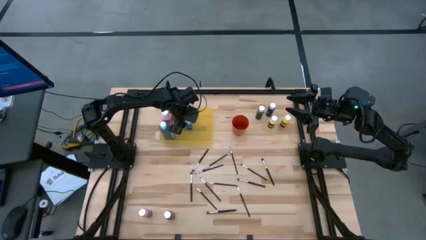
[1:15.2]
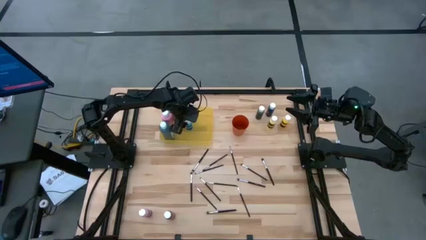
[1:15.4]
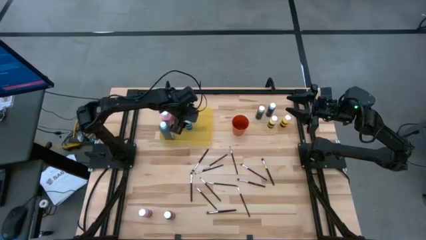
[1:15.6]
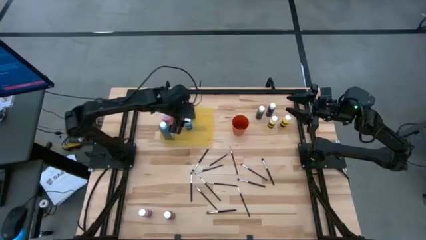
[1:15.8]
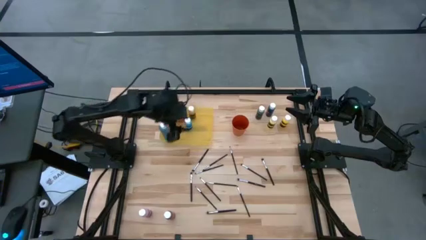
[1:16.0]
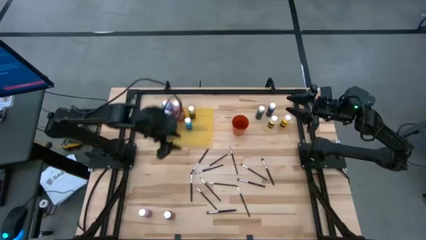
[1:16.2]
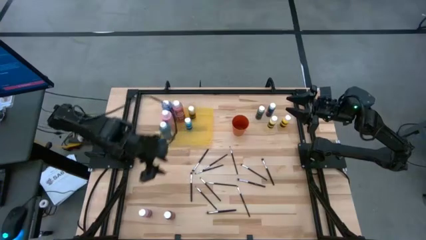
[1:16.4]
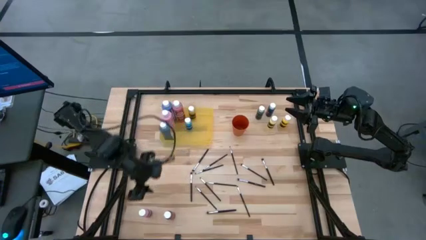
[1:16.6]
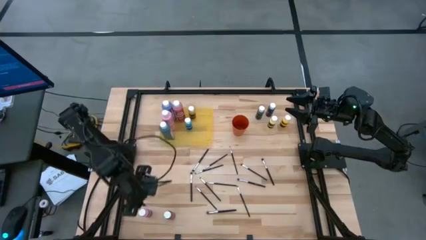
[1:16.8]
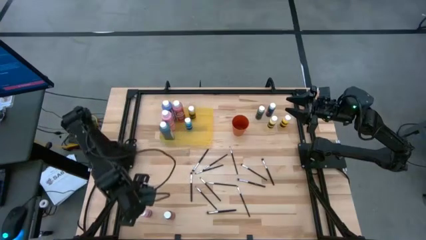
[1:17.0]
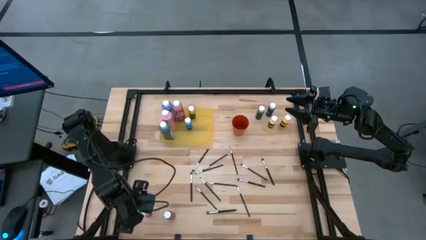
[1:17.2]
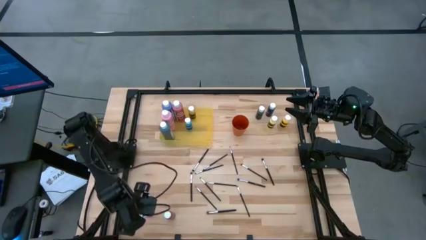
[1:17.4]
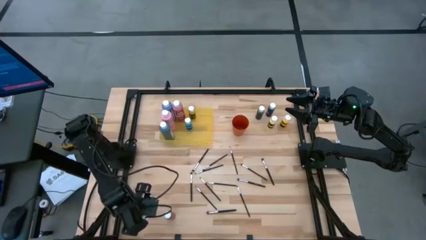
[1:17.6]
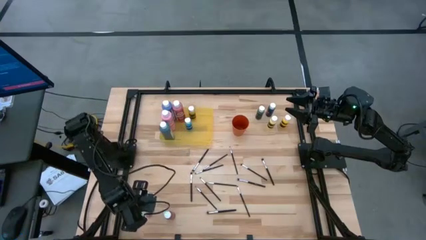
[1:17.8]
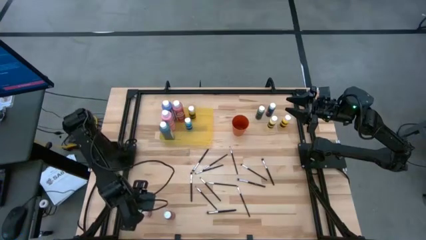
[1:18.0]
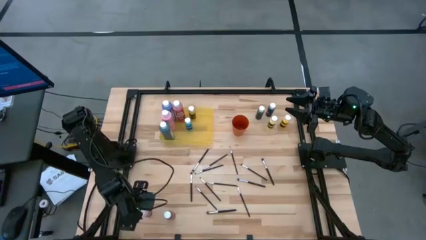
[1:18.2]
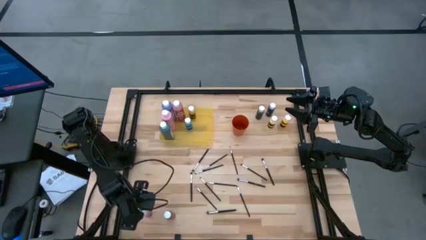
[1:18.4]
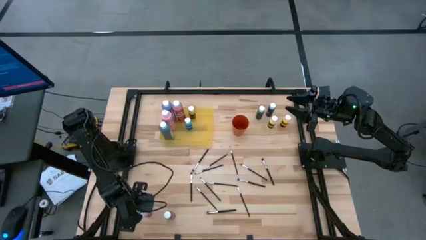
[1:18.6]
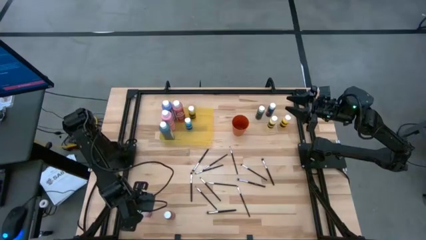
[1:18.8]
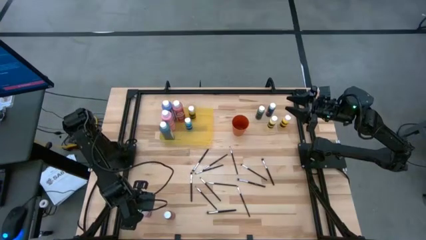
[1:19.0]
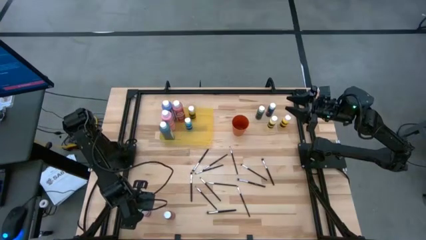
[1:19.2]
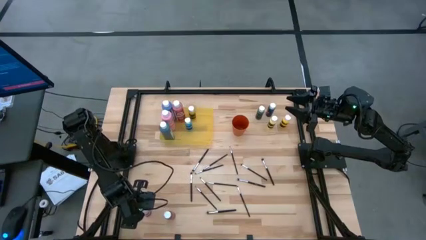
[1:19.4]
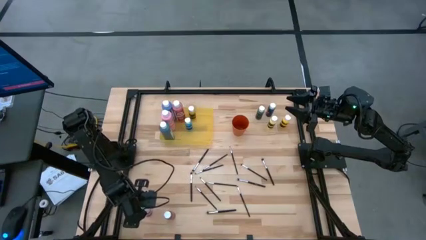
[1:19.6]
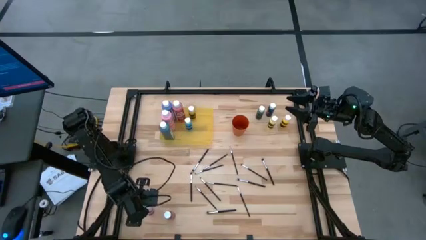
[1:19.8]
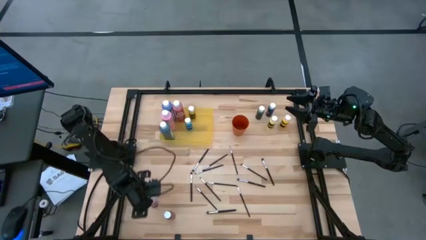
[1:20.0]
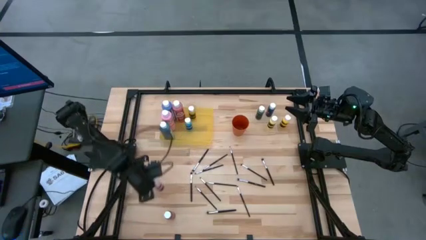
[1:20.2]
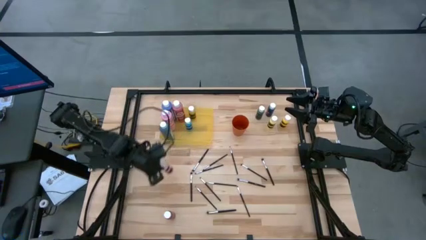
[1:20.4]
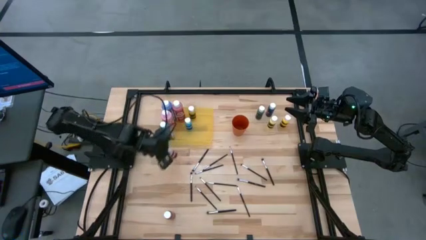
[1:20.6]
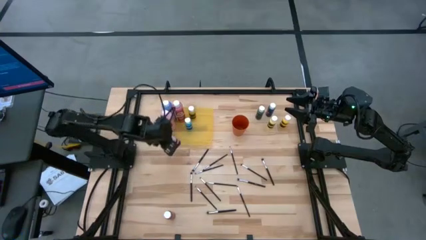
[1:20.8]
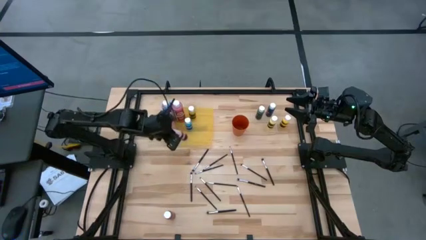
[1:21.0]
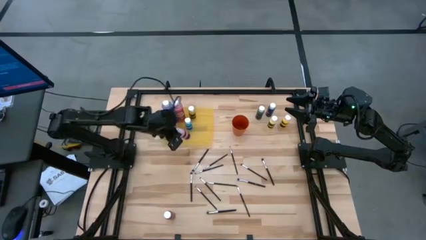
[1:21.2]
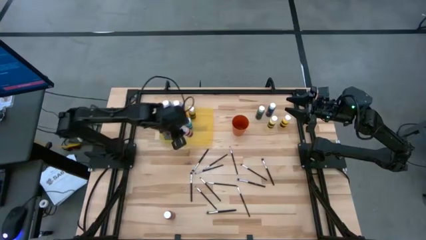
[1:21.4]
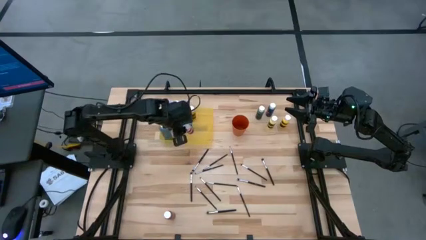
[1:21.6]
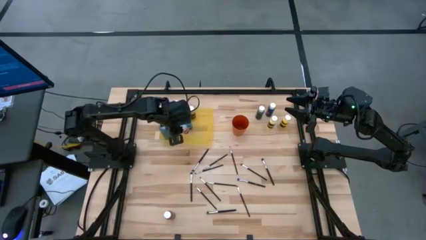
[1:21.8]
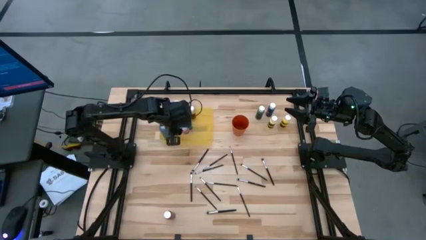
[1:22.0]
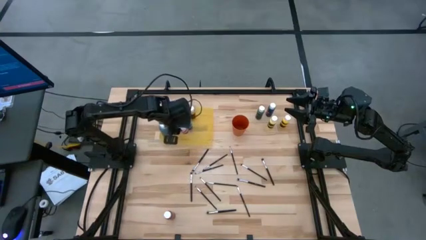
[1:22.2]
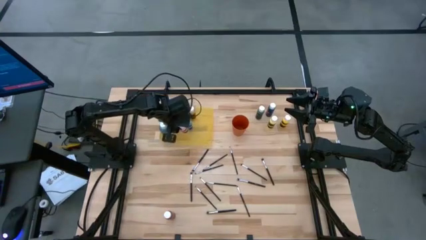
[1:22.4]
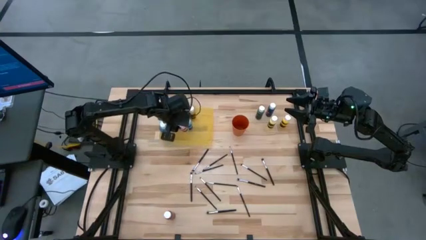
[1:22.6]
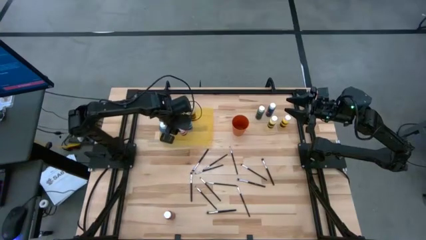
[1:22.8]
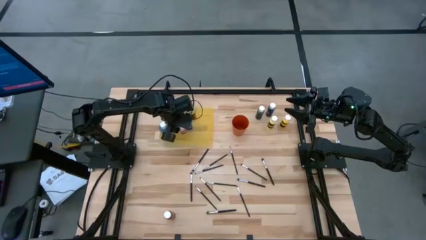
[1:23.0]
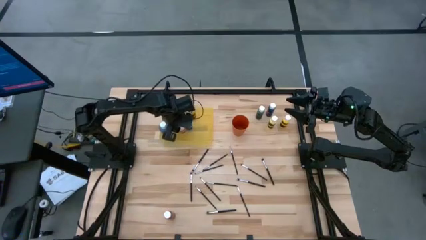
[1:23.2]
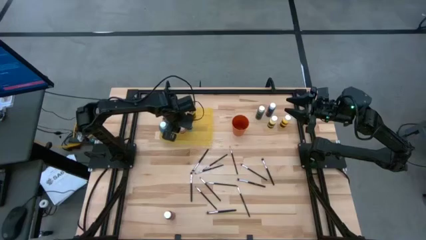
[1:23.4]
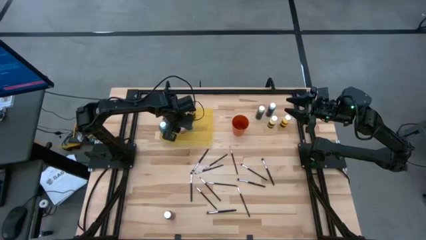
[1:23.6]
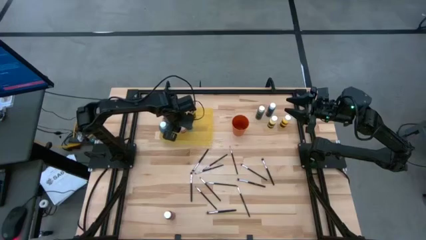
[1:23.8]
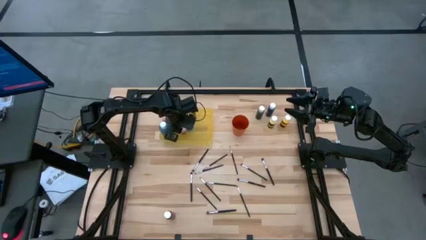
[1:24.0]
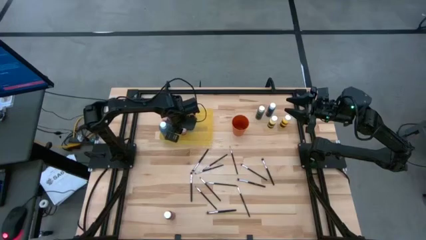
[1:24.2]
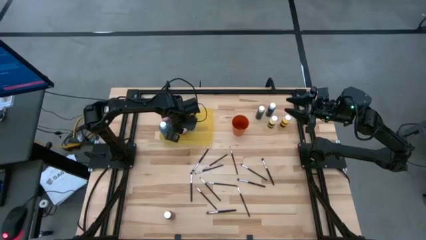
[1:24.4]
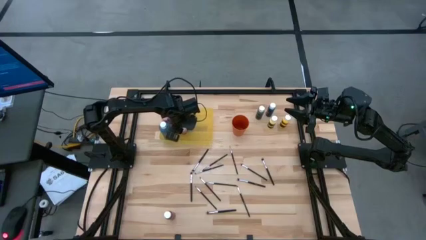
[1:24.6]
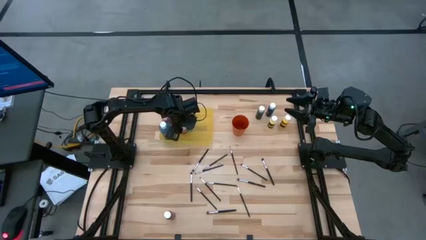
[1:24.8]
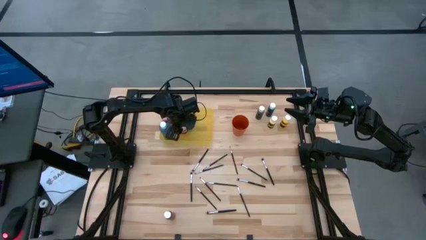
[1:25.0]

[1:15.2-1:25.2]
Task: Pick & Place Paint Supplies
Put the pink paint bottle into the yellow bin

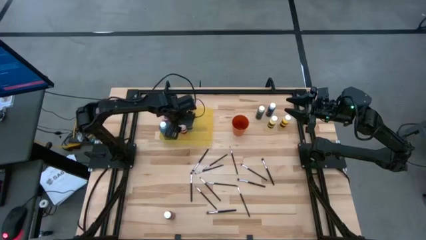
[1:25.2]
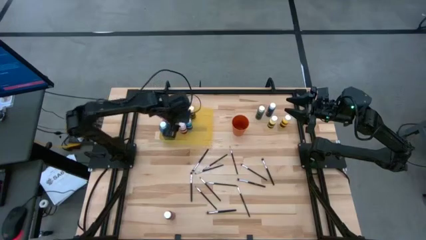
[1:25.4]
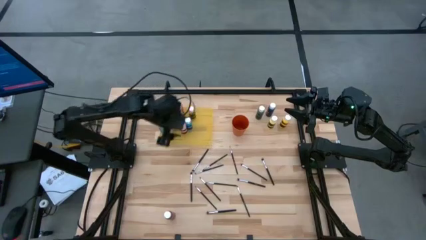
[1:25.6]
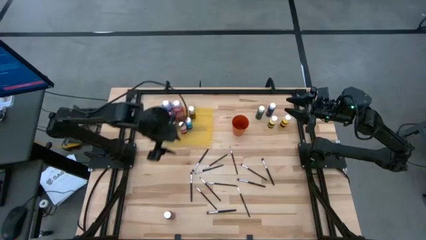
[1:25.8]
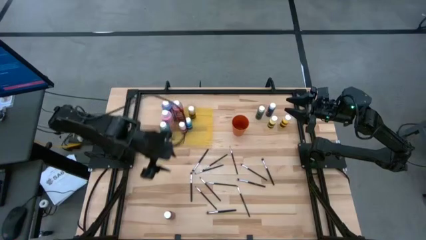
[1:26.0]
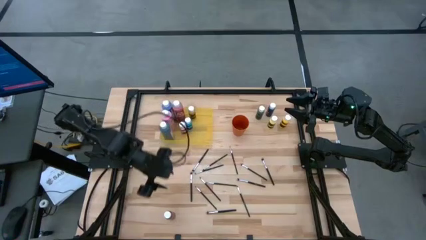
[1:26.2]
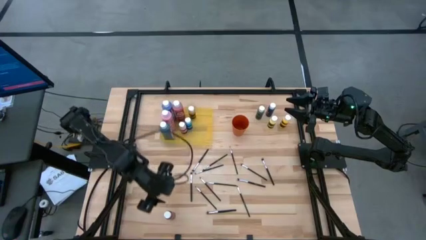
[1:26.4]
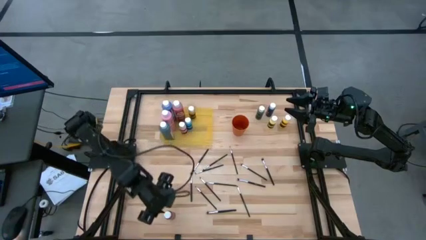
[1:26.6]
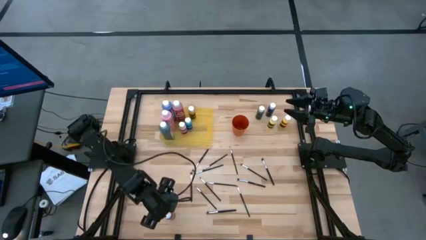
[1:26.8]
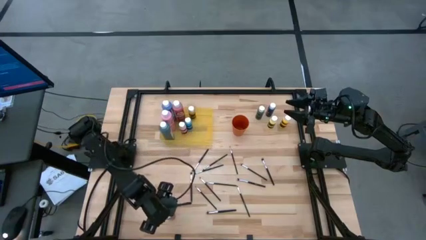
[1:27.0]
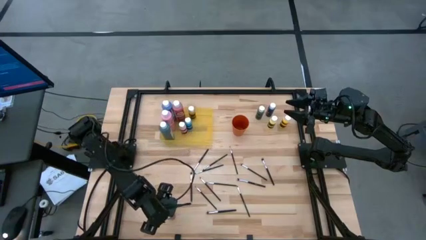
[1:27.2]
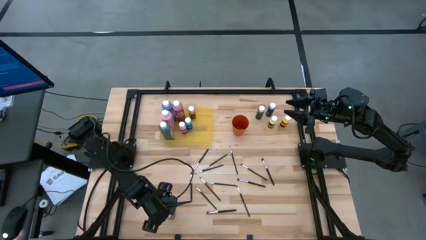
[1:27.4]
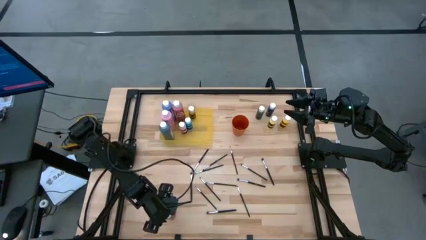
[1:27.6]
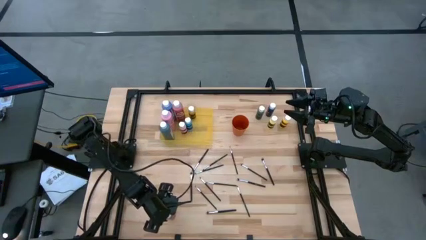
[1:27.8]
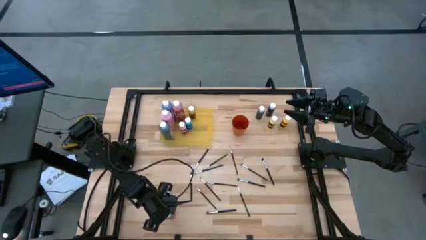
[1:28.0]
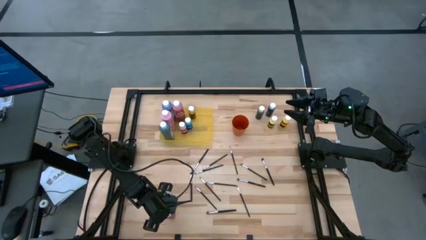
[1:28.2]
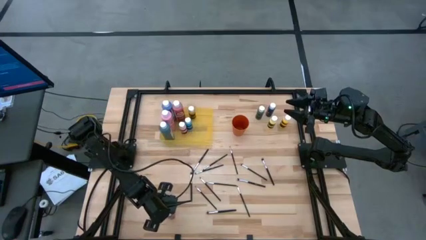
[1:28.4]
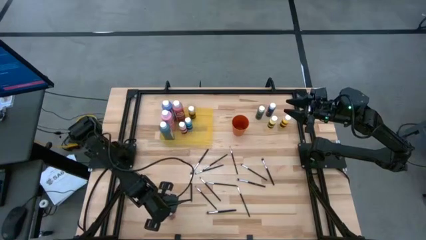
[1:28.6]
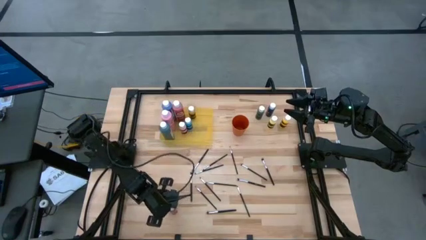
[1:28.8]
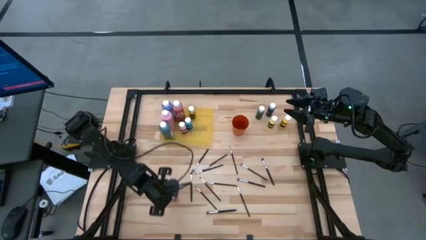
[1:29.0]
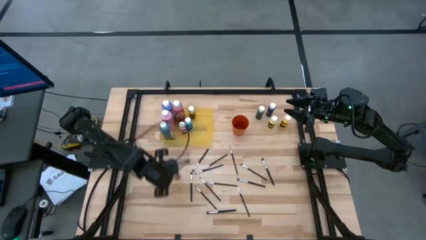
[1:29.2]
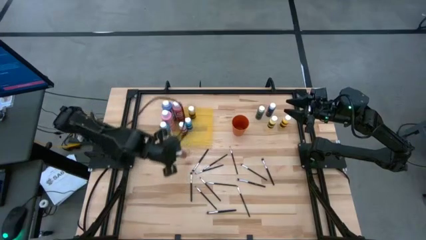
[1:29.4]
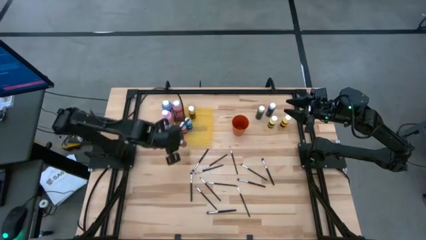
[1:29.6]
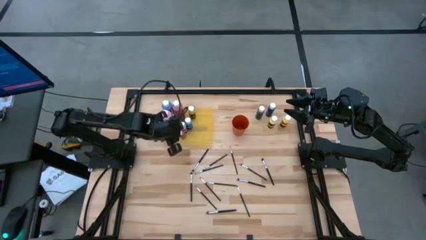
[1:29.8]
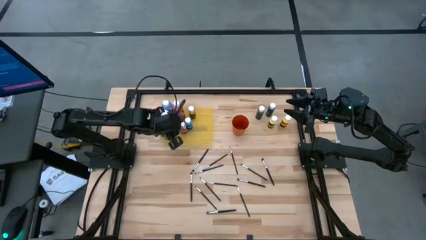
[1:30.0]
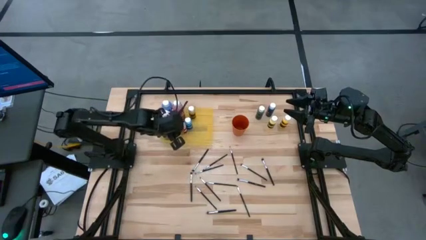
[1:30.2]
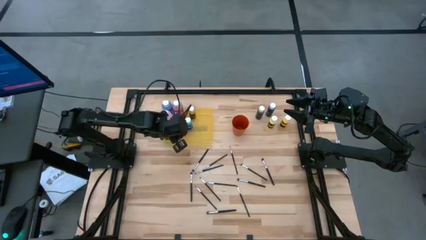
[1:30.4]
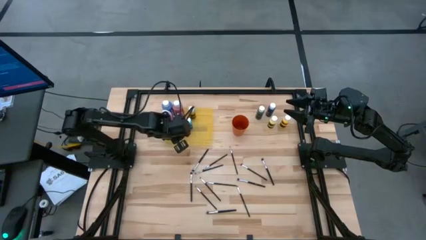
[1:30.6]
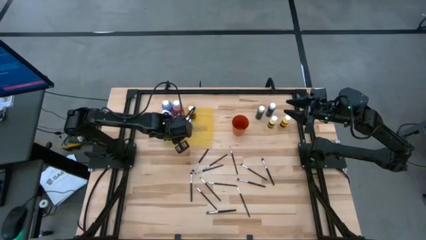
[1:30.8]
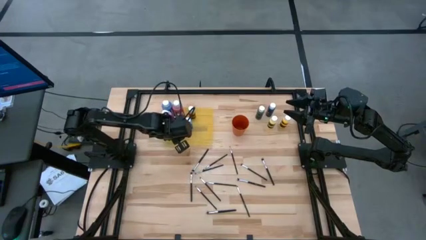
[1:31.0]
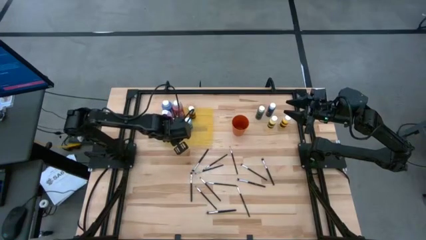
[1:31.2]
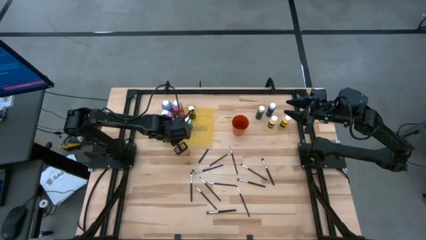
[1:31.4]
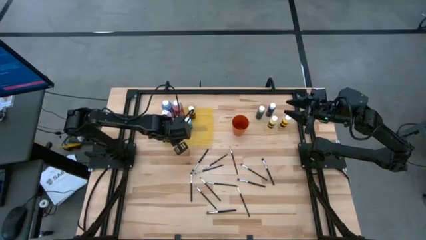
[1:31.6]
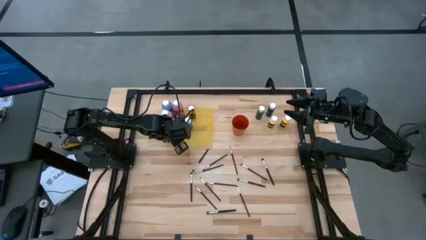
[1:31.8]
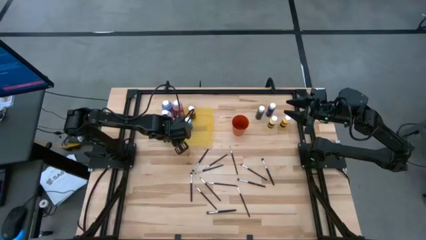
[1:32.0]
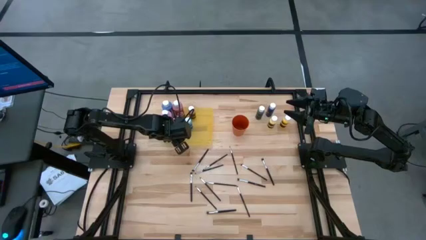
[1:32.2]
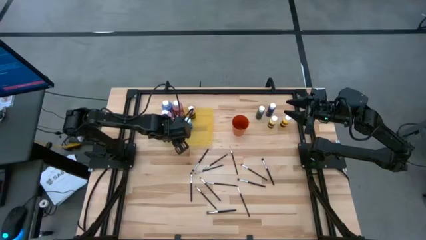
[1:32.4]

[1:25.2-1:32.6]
Put the red paint bottle into the yellow bin
